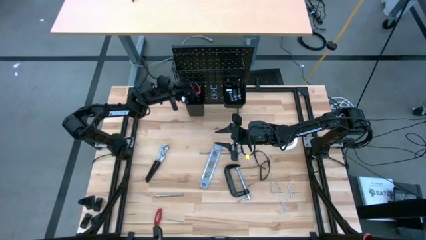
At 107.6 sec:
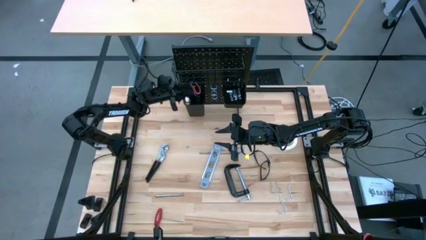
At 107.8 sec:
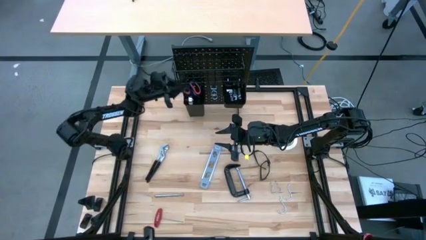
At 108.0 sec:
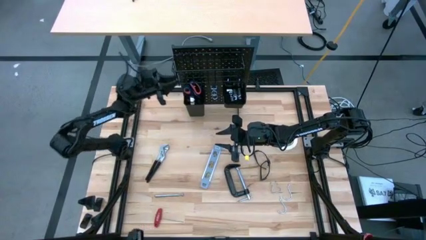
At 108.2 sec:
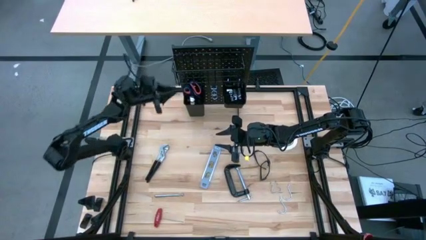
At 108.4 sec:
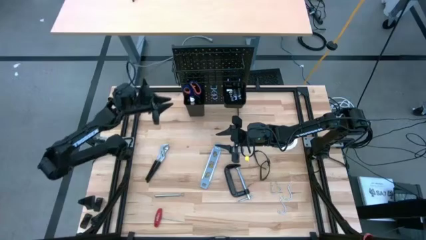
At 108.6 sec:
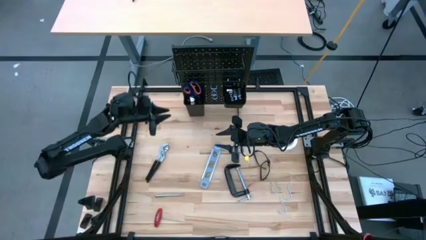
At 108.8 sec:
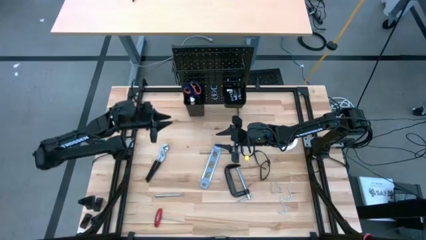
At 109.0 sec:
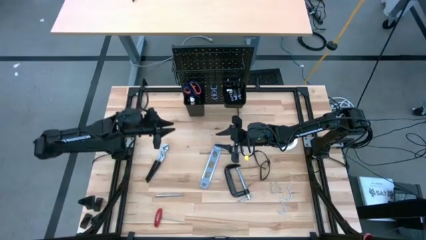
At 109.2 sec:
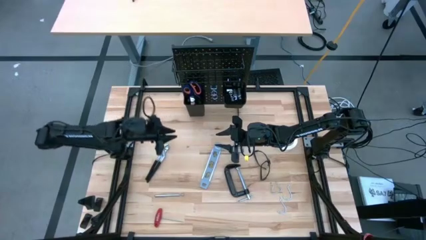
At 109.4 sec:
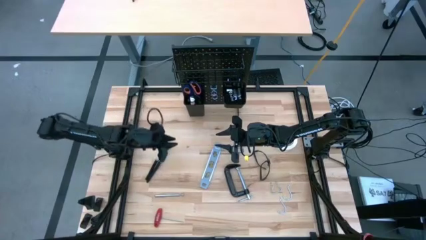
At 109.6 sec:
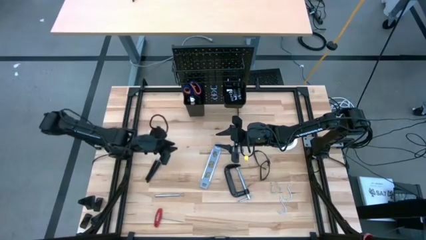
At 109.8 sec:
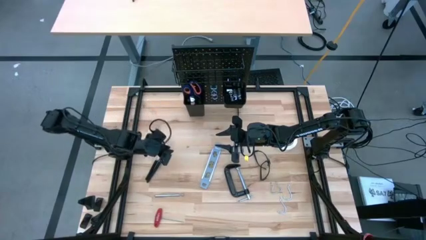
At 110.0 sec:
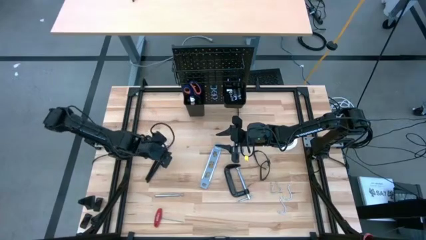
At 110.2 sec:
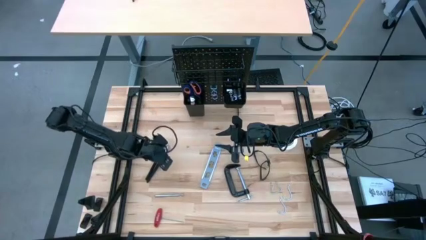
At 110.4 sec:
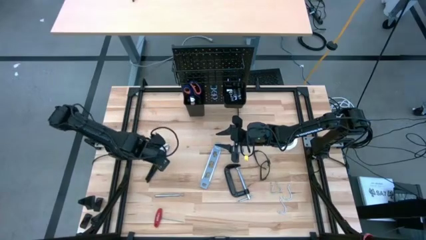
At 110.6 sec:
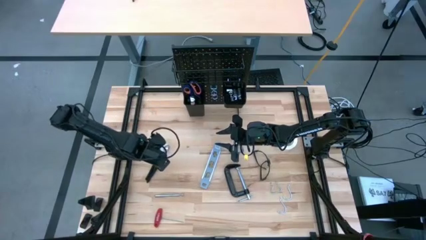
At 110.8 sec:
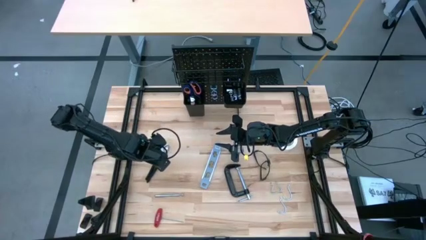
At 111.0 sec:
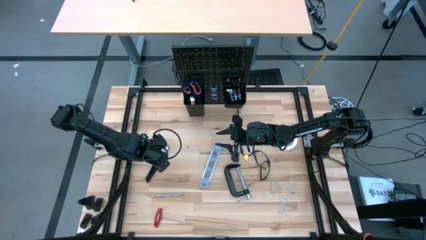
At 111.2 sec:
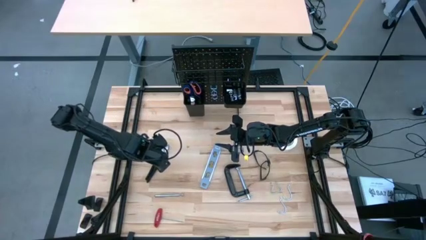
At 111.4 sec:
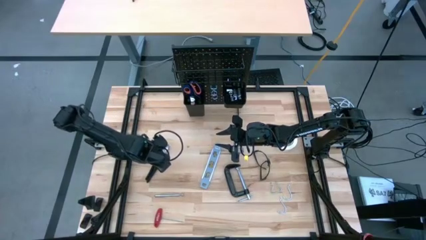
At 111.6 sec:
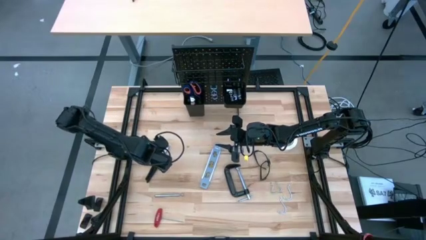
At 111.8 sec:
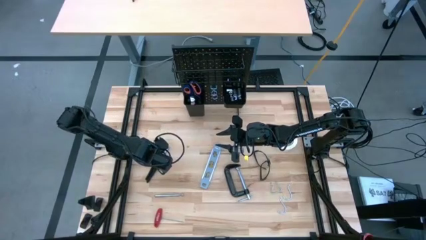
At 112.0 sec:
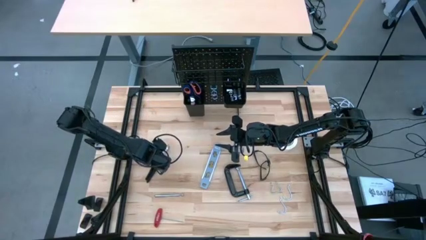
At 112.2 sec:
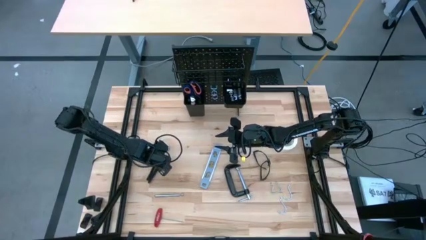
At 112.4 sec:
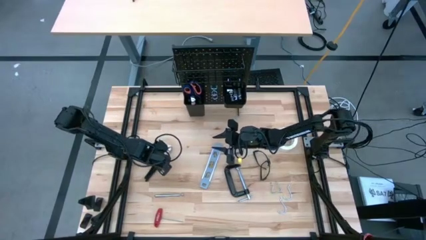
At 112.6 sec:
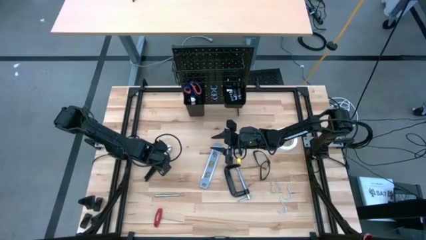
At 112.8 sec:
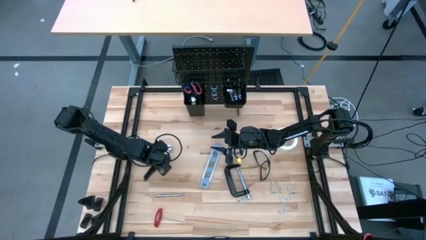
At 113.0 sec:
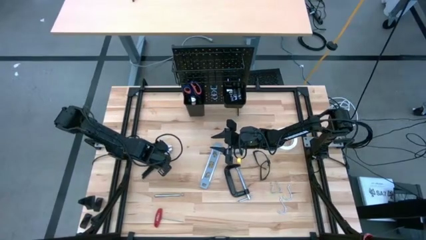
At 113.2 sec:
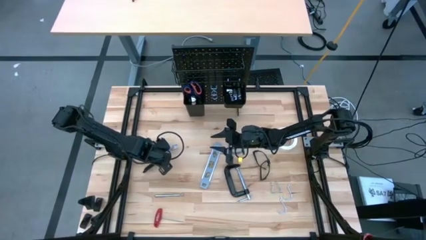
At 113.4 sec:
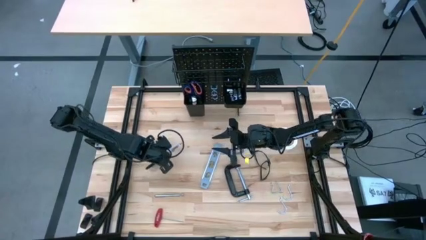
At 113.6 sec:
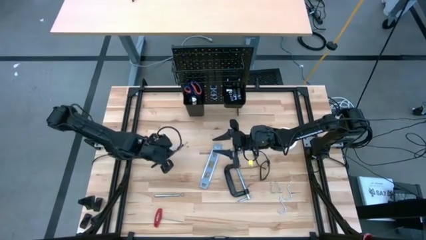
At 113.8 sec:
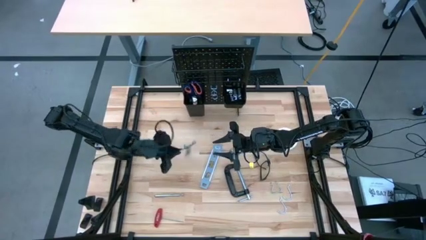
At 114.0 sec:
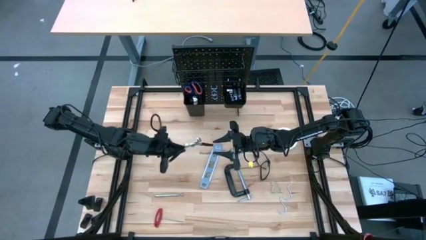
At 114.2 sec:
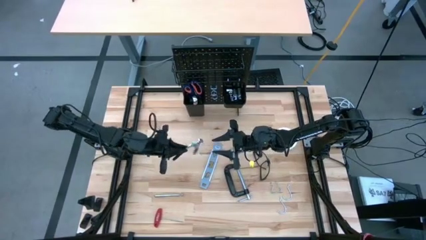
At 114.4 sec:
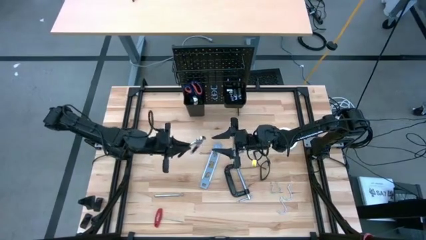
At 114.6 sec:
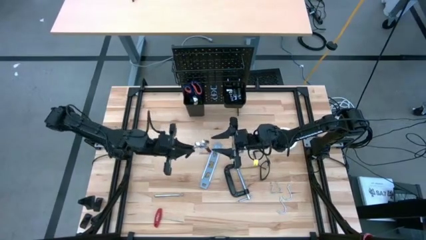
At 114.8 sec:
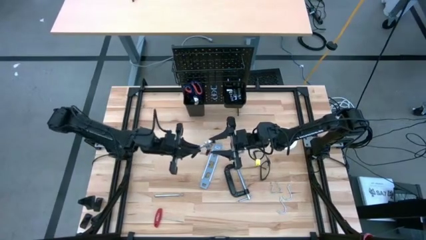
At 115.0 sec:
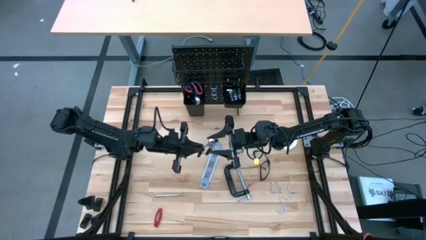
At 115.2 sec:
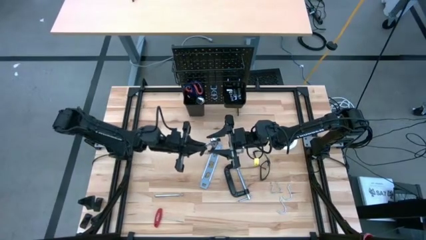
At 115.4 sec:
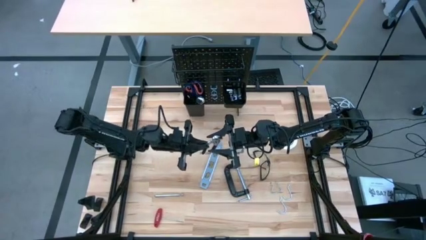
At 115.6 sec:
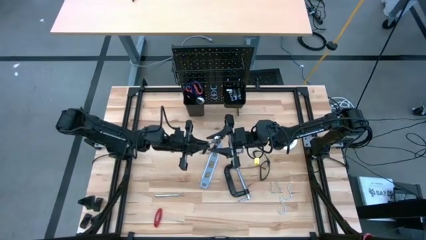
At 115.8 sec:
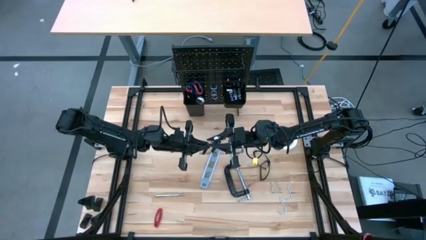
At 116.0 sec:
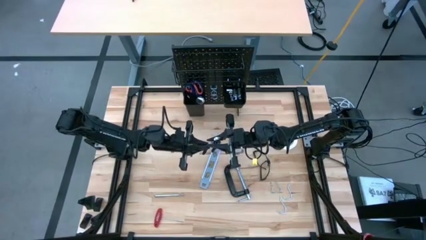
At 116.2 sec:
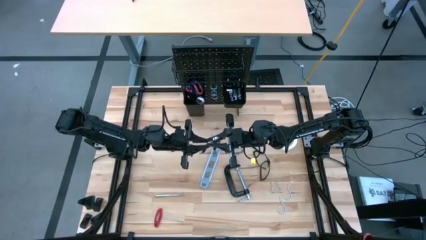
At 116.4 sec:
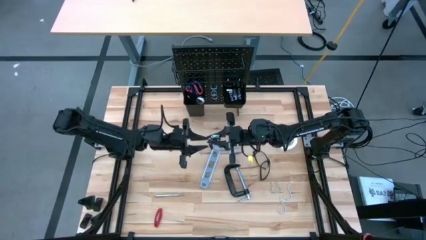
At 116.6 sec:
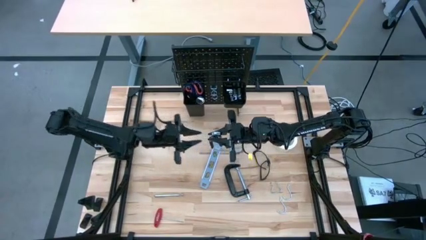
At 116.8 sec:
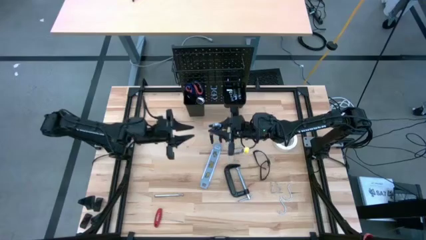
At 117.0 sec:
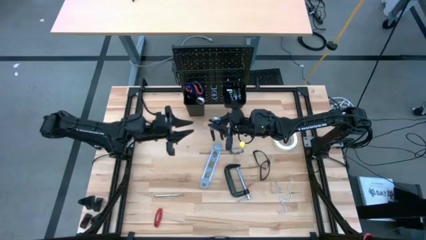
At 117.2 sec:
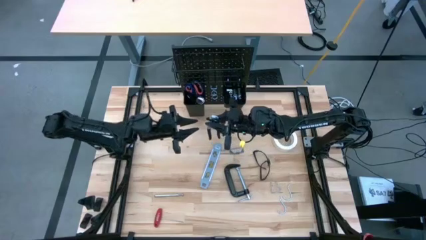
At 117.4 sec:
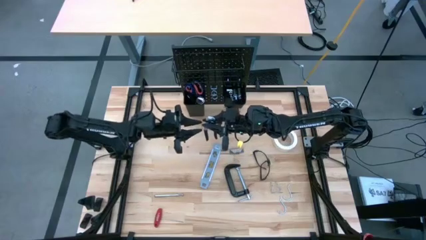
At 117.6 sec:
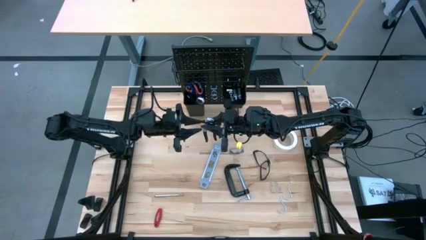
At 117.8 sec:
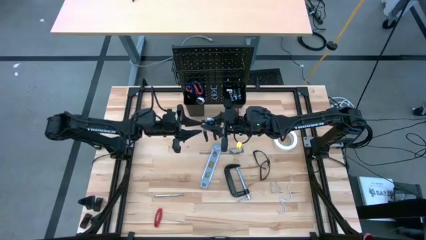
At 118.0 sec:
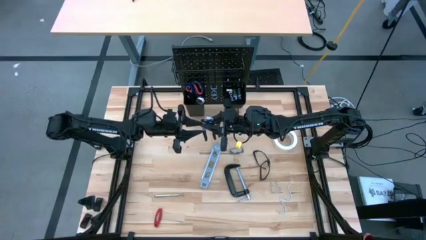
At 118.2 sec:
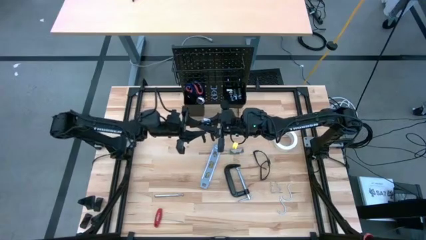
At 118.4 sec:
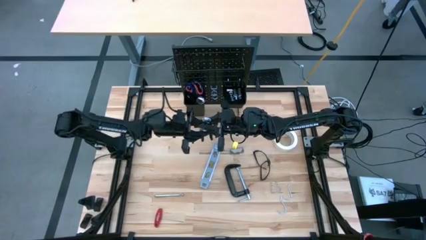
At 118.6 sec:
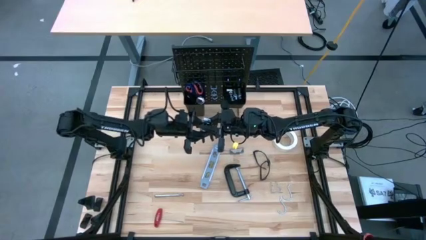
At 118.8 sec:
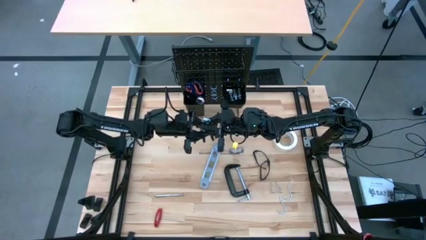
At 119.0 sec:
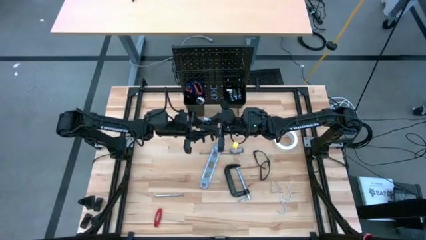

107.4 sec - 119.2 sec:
Task: Hang tools onto peg board
Put the slip-joint pliers into the left black bin on the peg board
